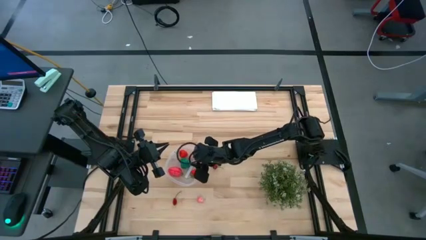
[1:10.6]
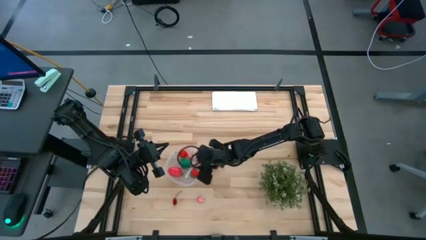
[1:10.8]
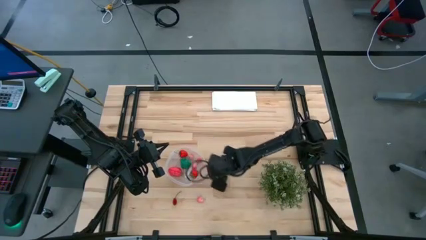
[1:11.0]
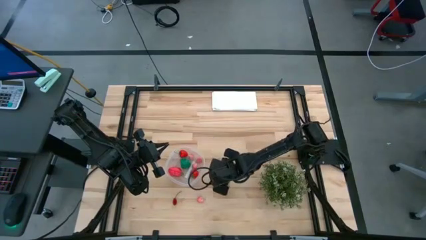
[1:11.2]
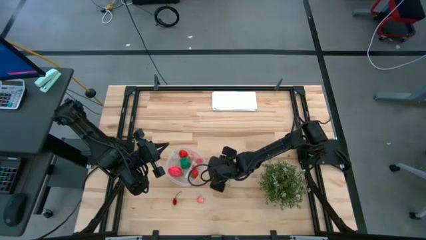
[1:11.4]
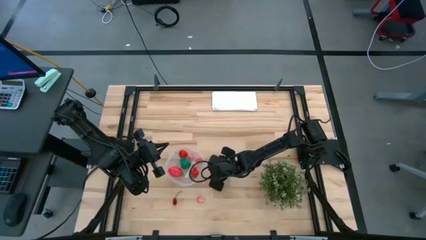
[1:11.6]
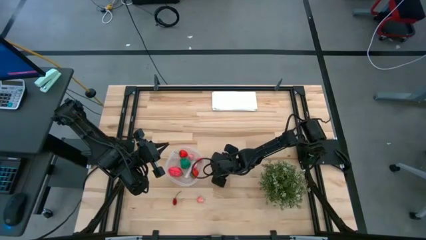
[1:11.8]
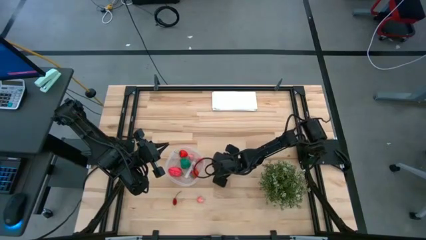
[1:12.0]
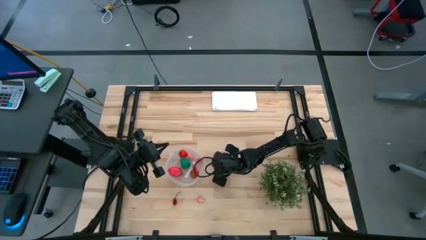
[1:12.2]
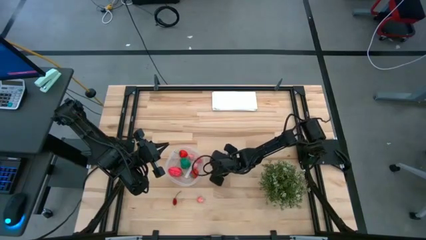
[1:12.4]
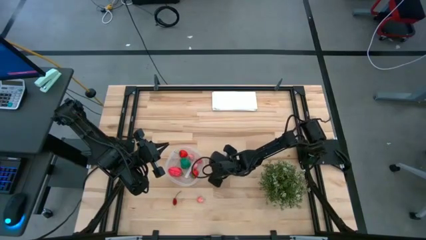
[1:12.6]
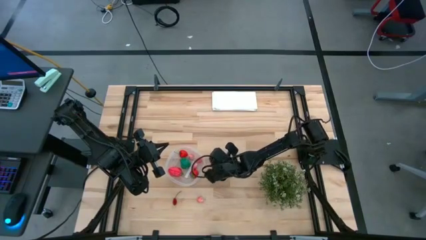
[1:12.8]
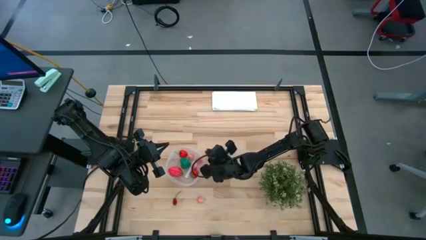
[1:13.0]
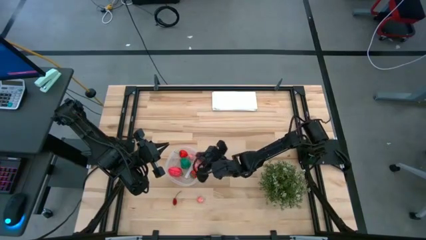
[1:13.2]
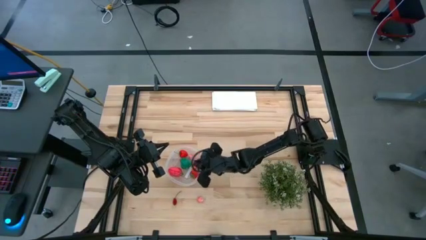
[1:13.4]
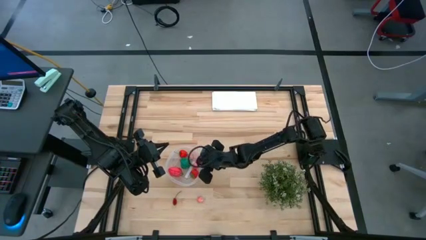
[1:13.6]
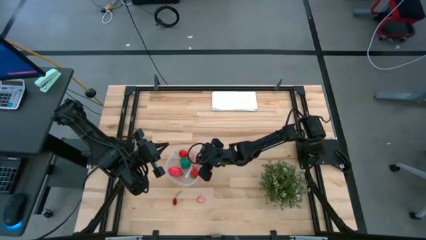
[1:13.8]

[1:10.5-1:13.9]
Task: Pick and placing Produce into tupperware
Put the cherry into the transparent plastic container

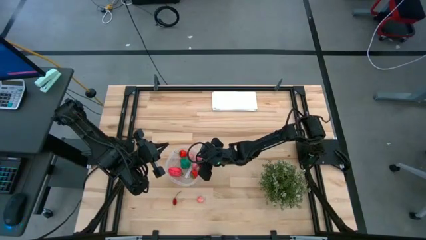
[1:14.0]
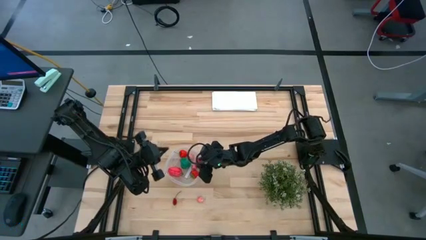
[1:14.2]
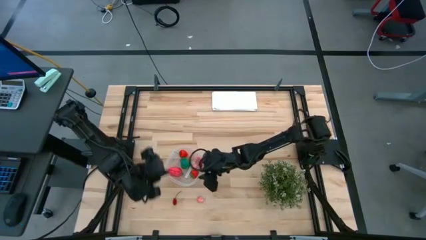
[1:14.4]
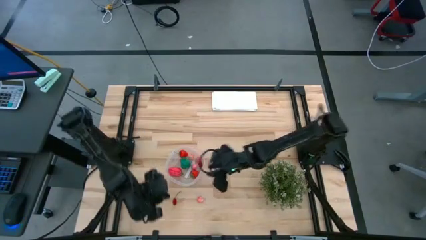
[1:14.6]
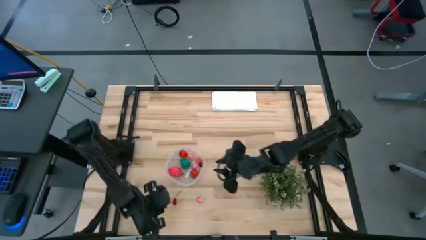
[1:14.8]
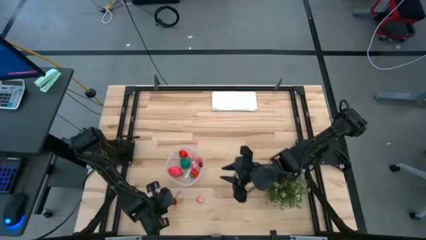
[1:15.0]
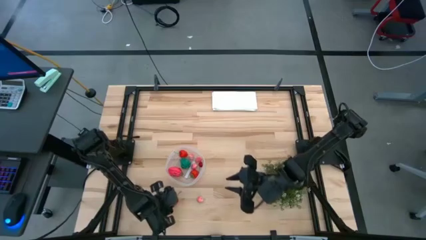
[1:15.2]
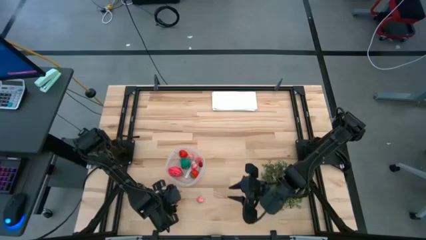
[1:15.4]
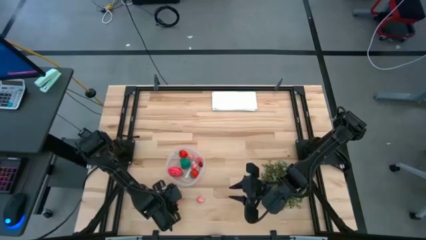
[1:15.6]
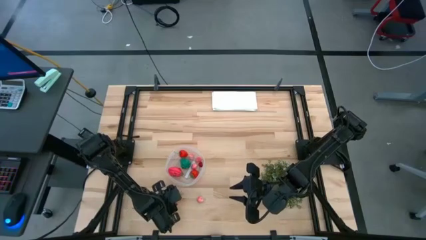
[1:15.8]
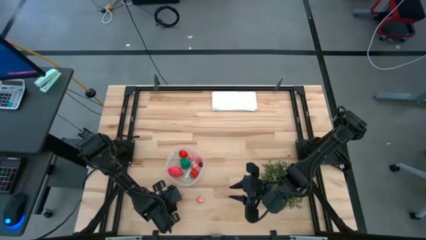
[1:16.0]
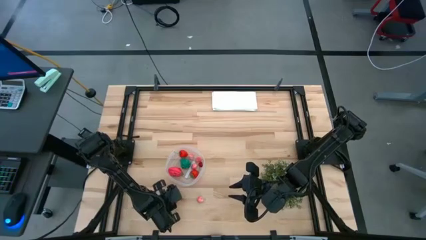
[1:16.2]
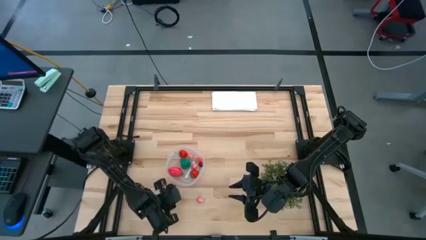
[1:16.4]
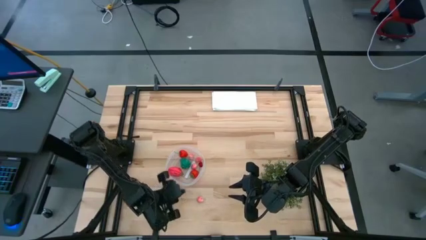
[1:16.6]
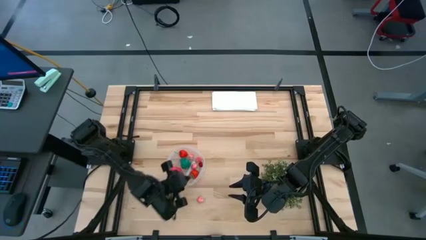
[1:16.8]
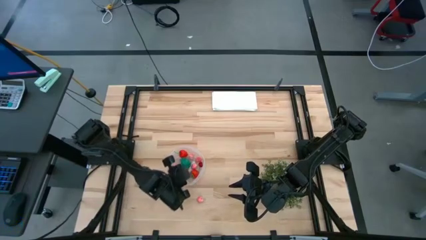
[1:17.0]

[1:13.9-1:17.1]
Put the cherry into the transparent plastic container

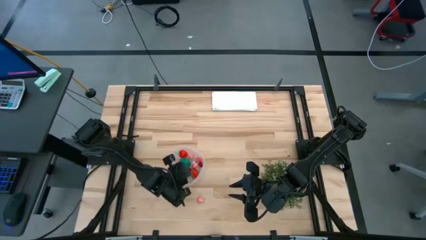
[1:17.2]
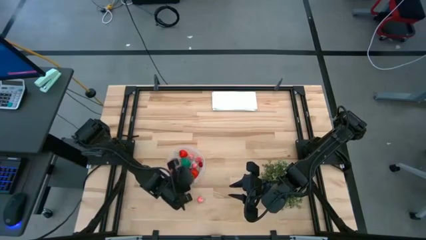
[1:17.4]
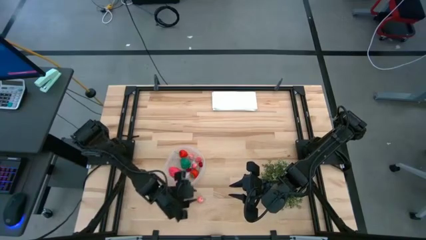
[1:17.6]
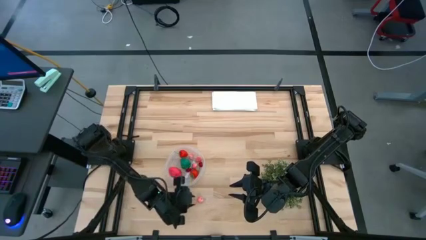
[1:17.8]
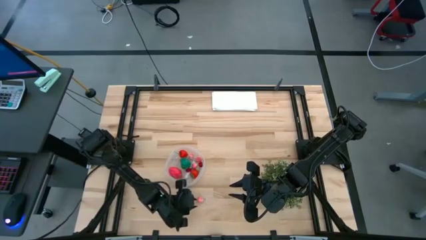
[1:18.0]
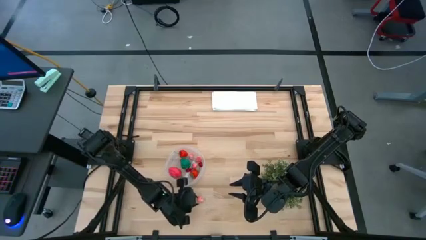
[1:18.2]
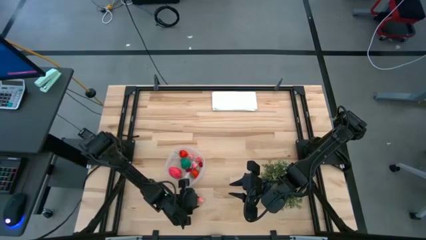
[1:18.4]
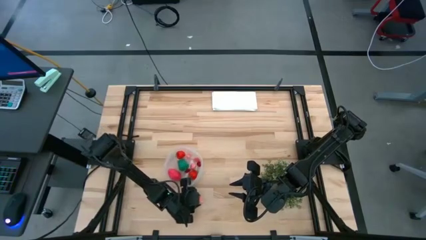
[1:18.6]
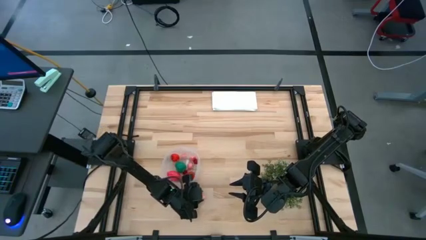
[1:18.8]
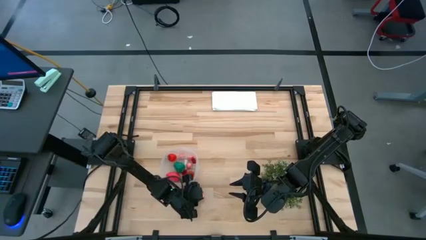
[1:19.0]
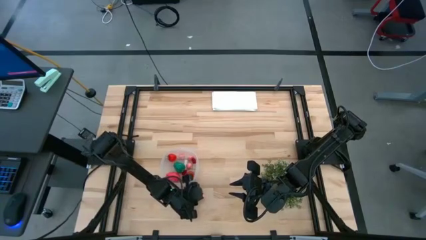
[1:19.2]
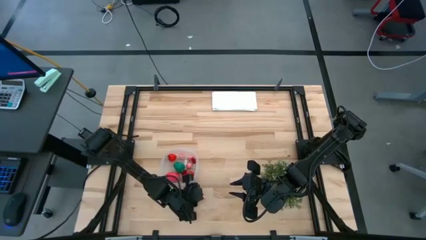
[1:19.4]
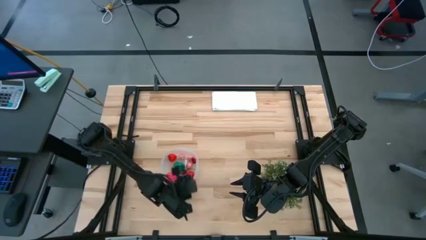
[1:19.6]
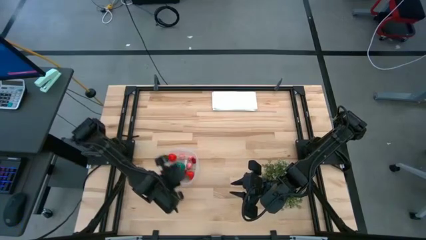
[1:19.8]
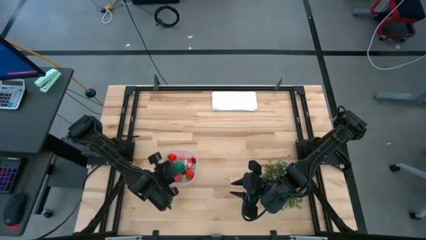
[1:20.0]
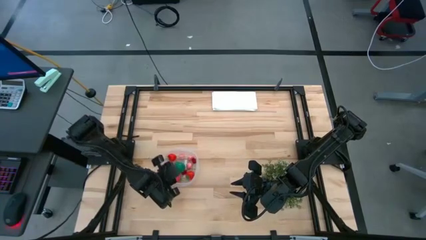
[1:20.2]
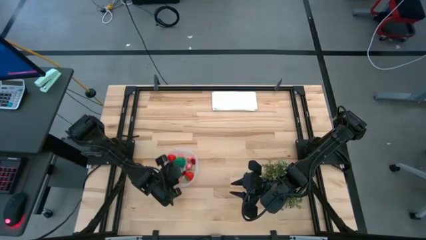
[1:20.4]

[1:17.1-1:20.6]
Put the peach into the transparent plastic container

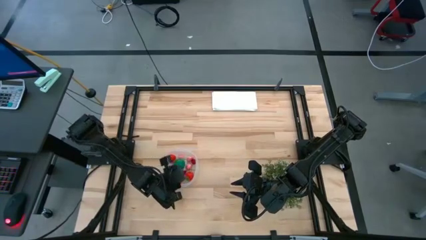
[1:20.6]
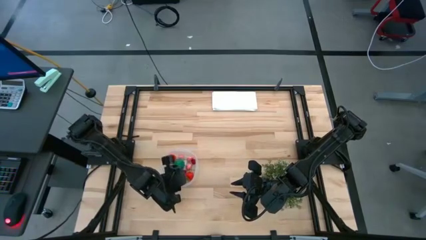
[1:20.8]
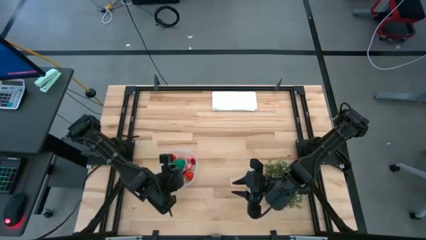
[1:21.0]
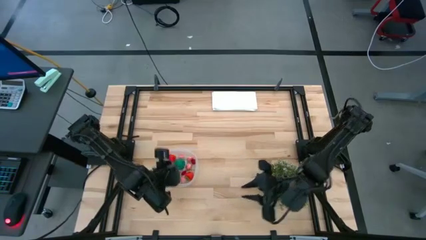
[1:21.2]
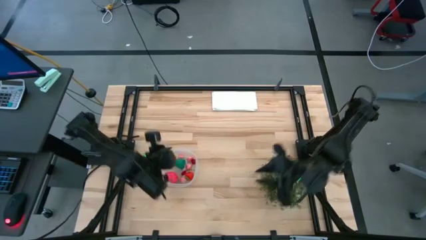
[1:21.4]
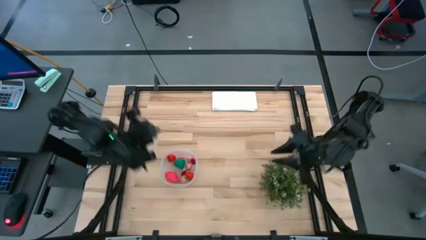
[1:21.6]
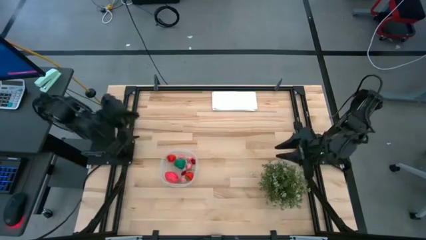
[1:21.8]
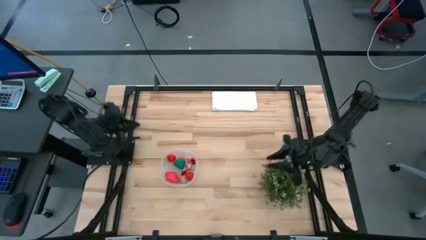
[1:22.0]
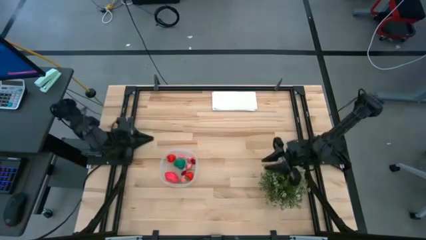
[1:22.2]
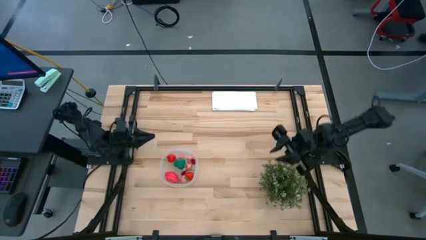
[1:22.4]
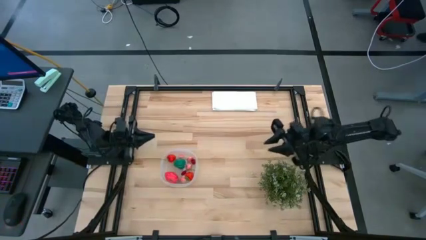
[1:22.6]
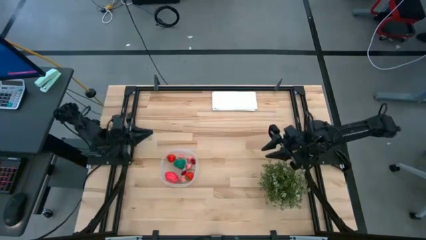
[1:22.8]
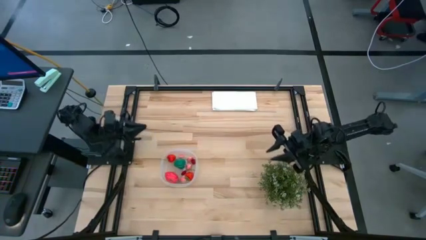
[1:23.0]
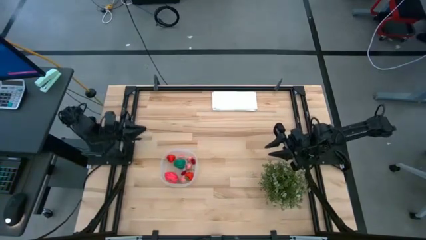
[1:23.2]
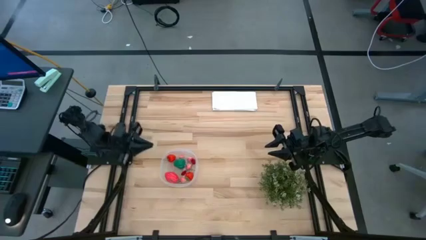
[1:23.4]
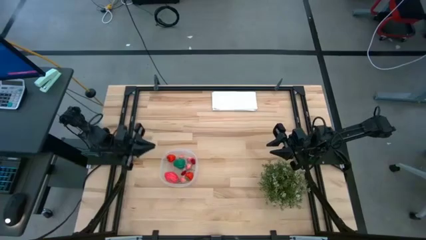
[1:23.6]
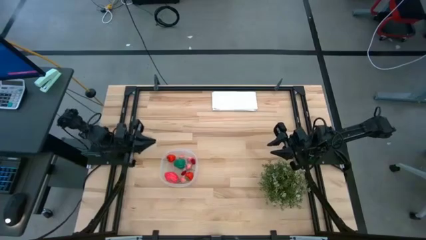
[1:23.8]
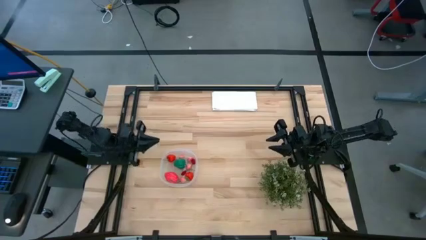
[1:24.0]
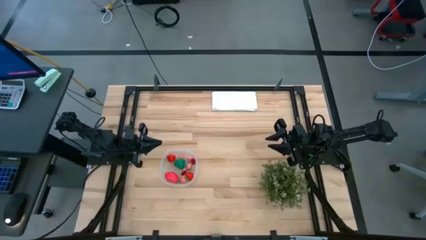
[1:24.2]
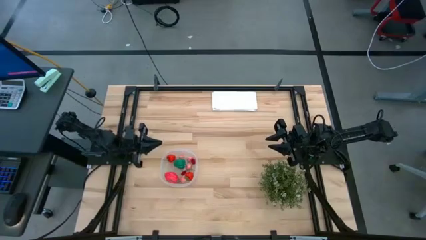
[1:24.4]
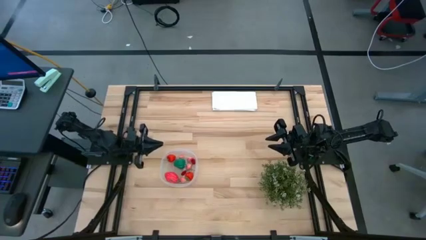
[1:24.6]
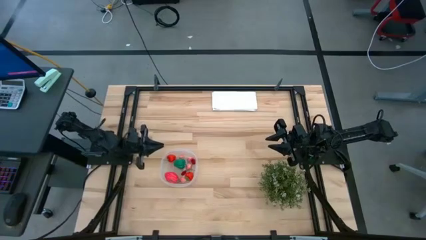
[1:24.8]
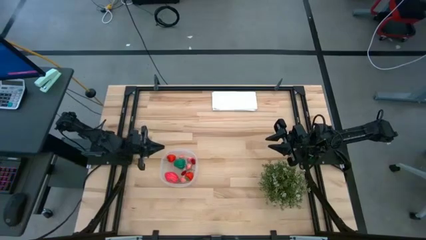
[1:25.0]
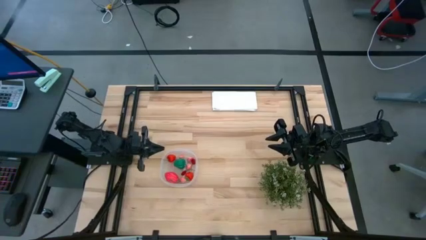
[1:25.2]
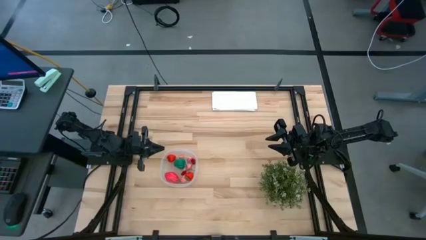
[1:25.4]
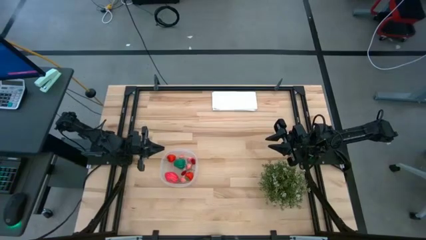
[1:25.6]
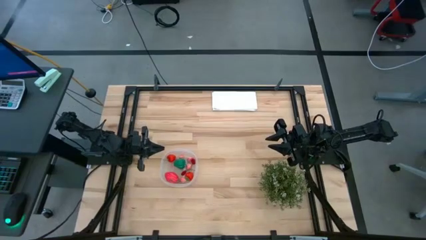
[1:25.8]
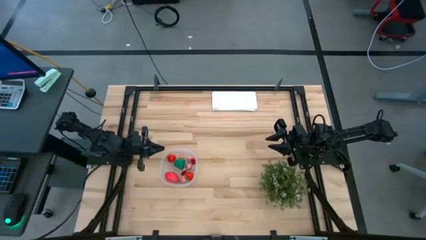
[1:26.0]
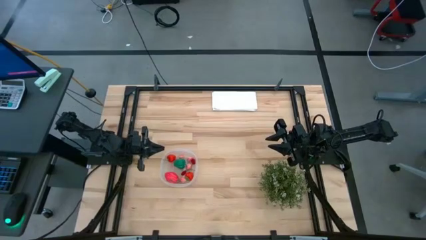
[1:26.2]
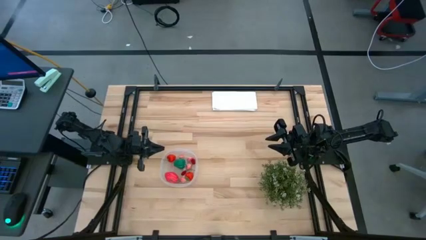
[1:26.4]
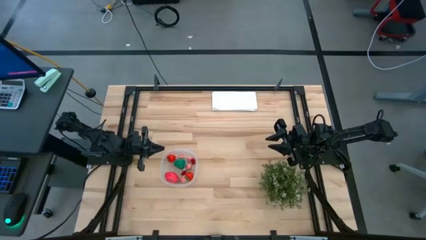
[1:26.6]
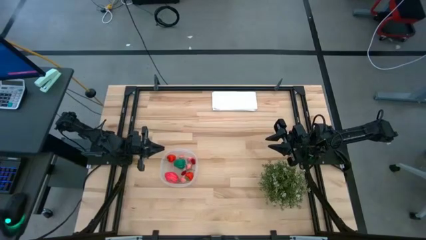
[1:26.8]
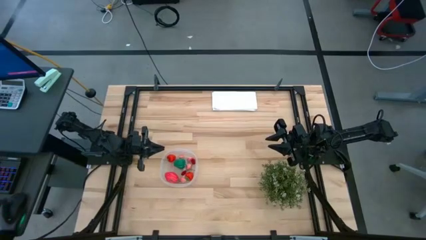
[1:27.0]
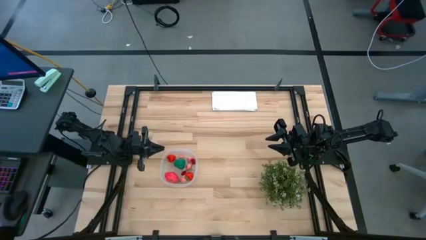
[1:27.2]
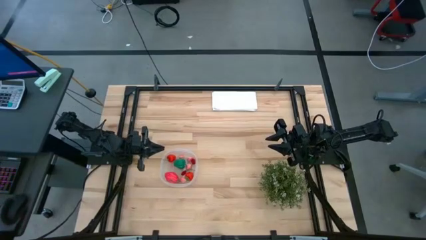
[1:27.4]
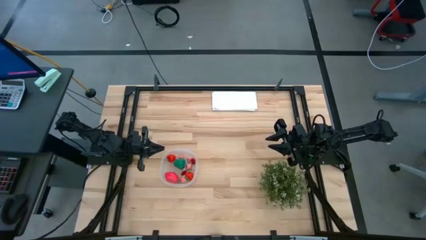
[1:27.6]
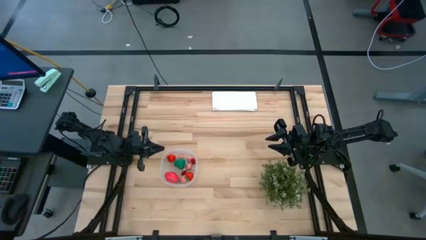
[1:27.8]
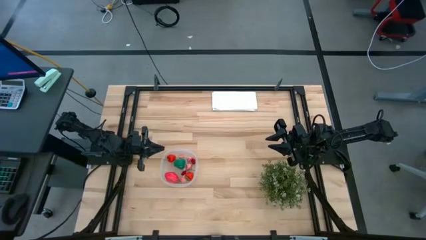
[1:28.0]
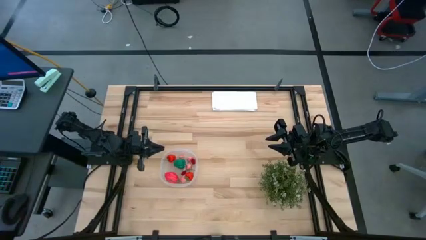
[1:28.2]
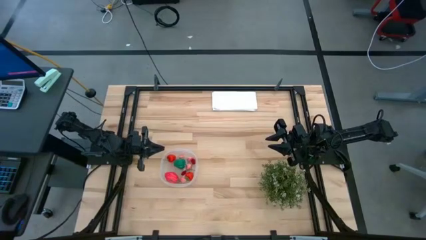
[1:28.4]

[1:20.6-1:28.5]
Return to Home Position
